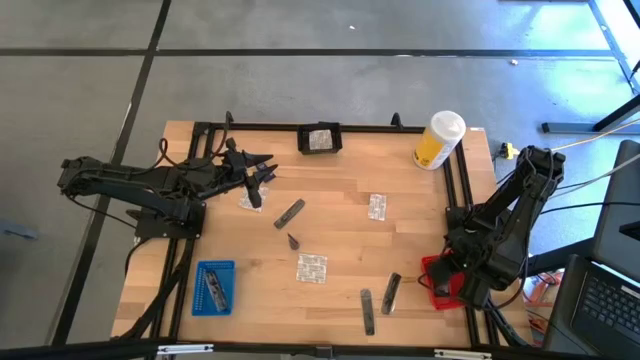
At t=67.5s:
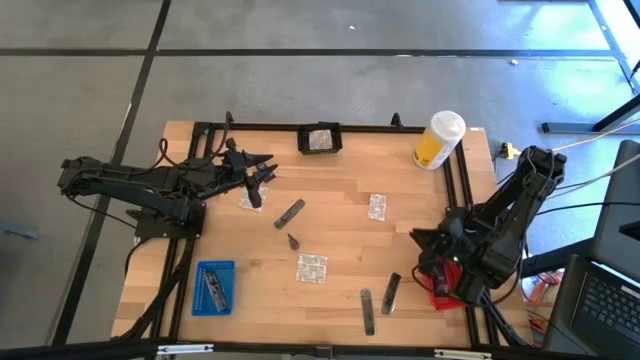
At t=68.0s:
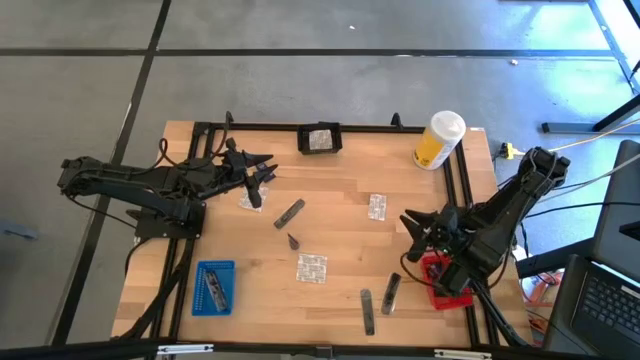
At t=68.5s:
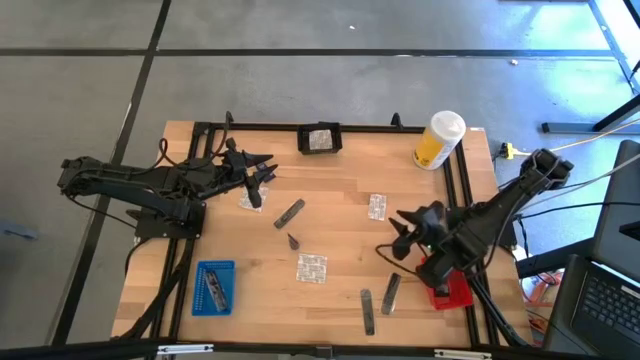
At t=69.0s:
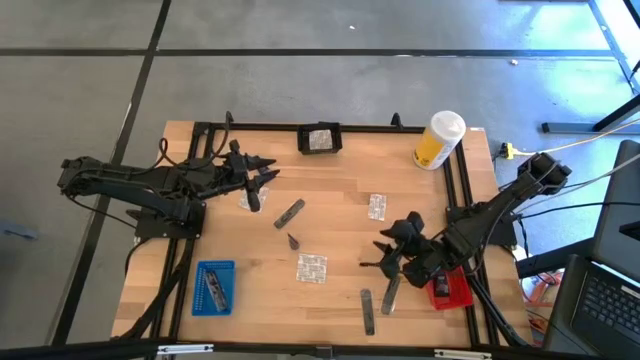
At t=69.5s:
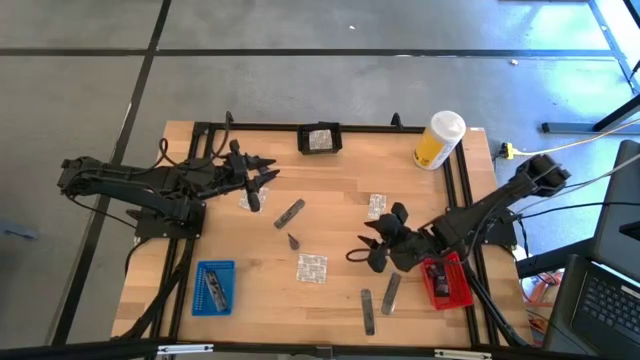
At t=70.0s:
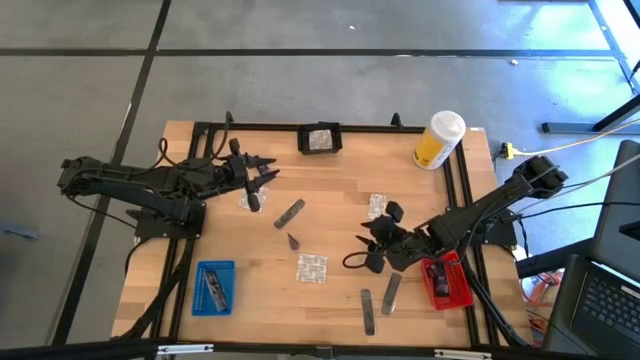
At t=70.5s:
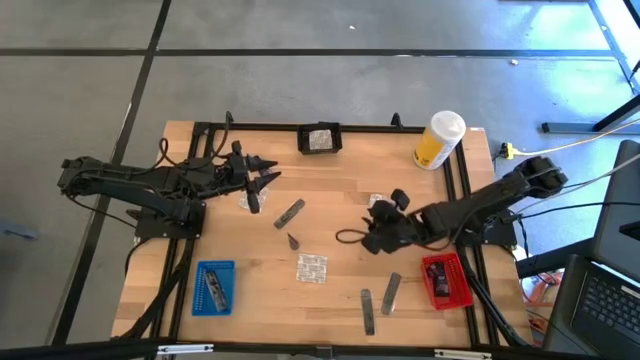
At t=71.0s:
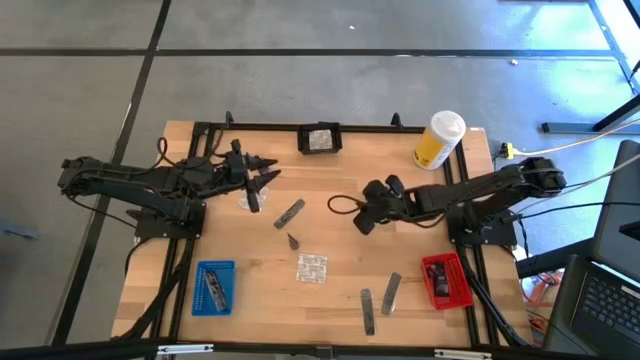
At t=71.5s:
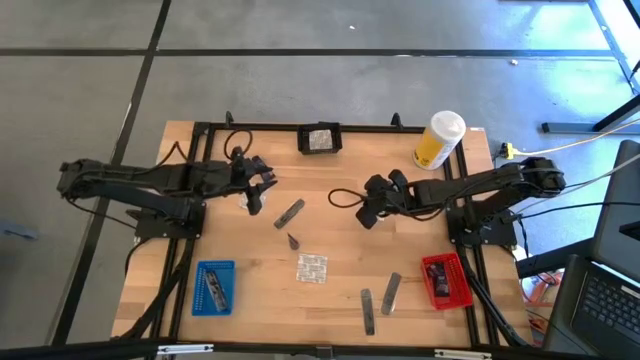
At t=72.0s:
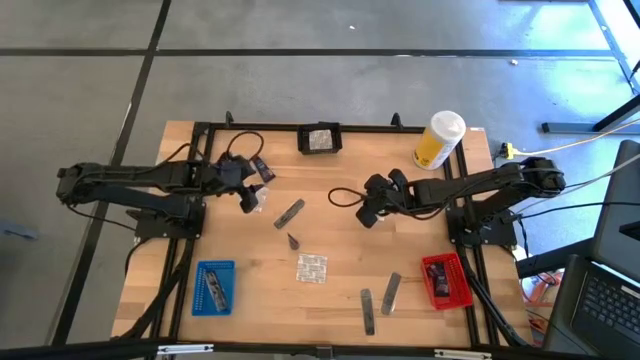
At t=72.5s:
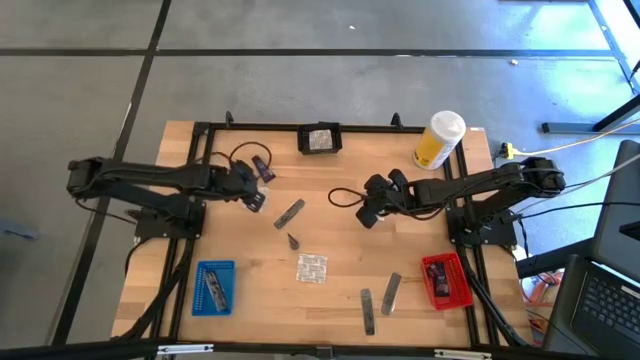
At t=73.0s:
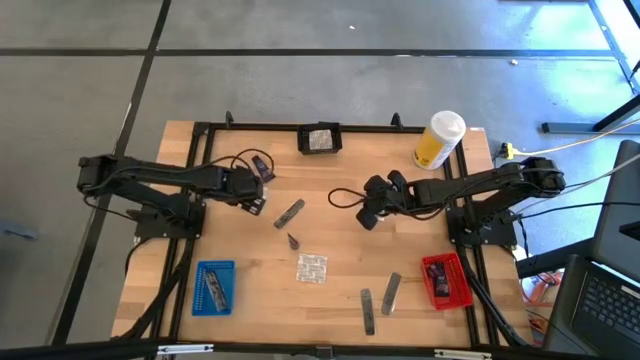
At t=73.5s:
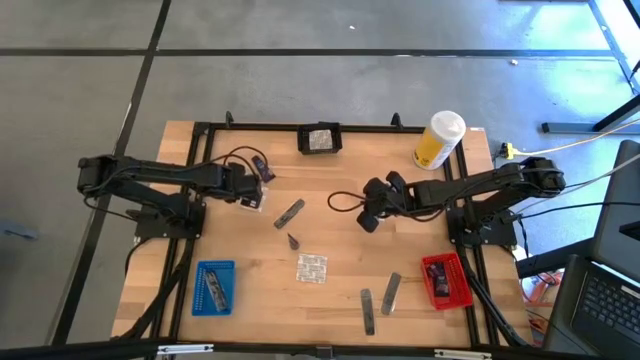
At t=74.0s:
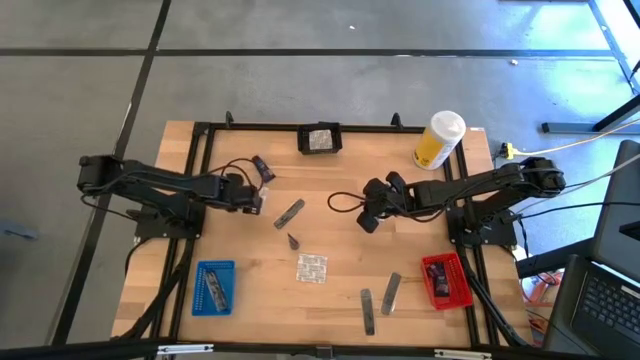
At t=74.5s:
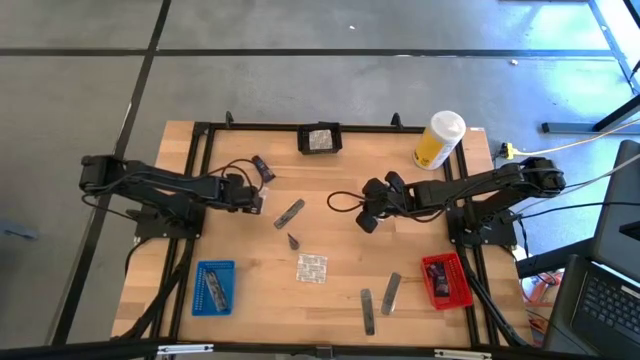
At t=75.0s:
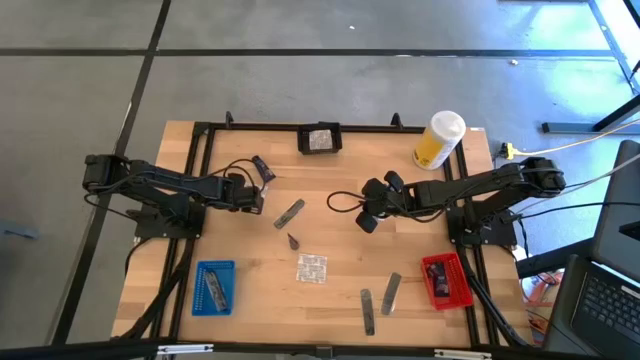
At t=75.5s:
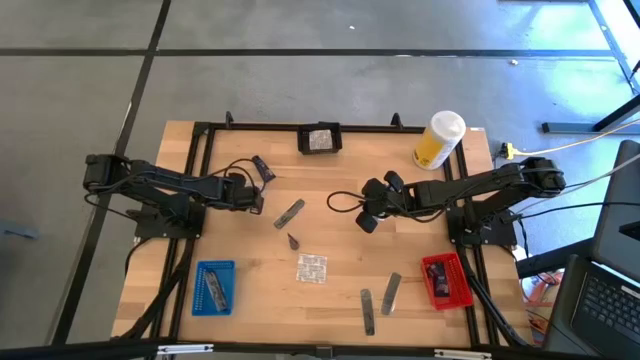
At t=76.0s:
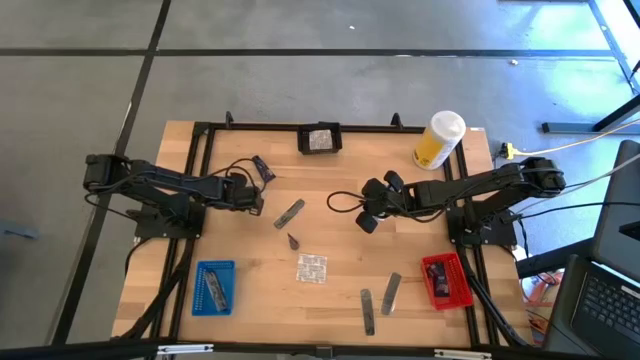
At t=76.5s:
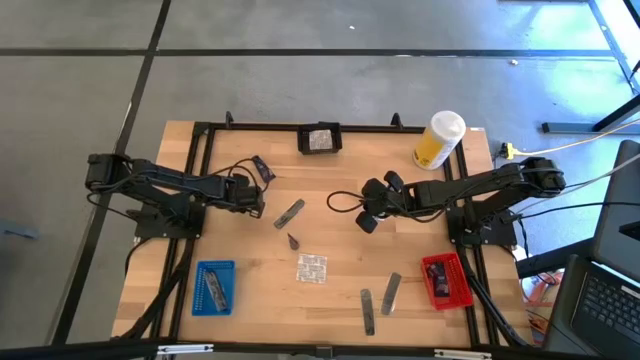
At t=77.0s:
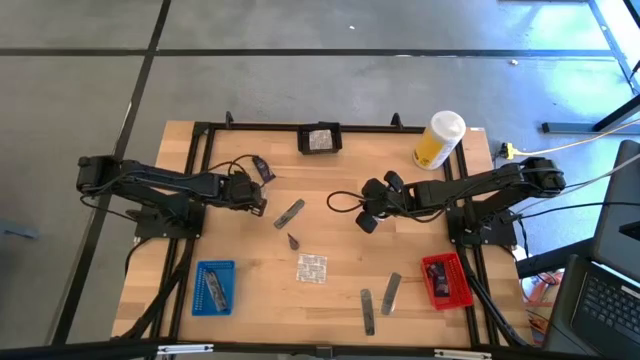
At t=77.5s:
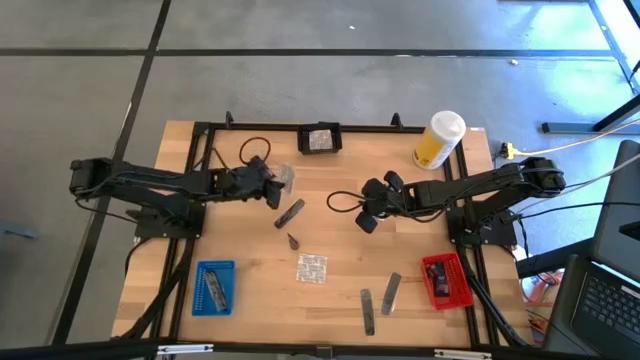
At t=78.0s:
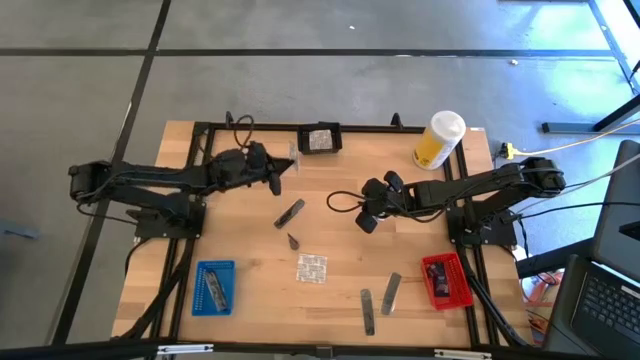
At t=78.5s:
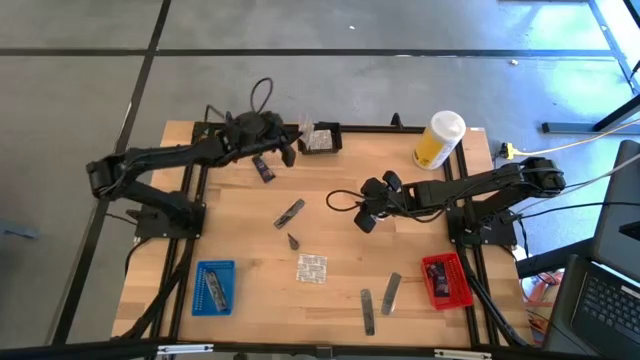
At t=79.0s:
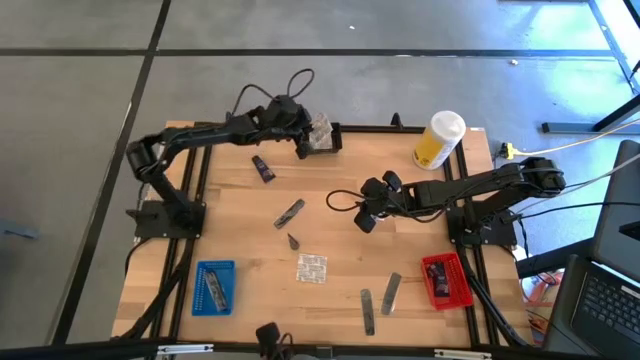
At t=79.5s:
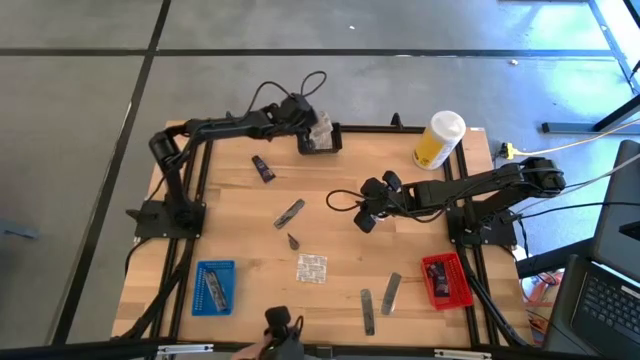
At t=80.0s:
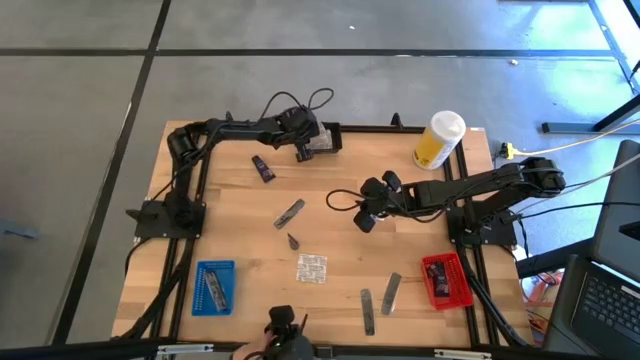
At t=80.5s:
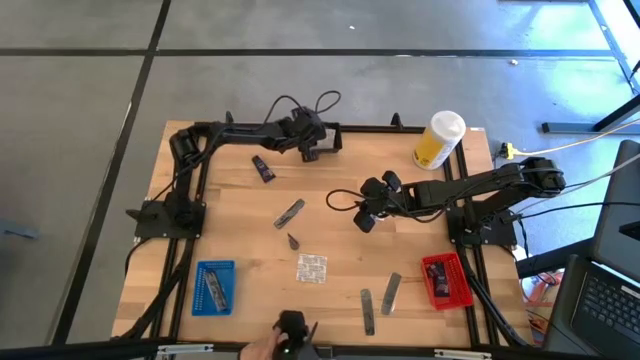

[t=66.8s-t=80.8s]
Task: Pick & Place Travel size toiletries
Put the white bandage into the black bin

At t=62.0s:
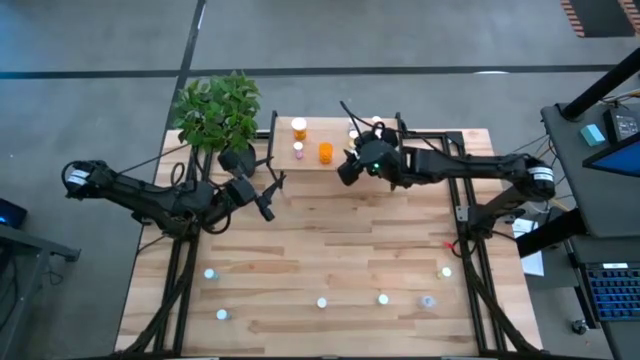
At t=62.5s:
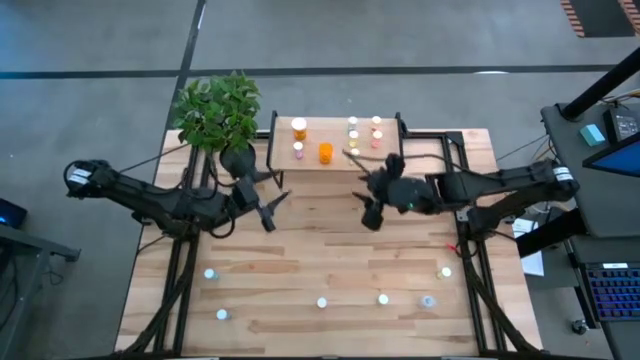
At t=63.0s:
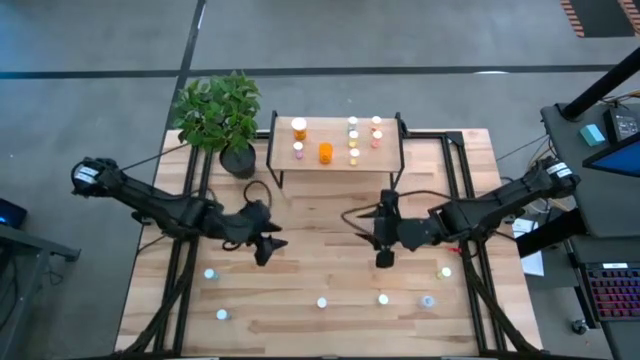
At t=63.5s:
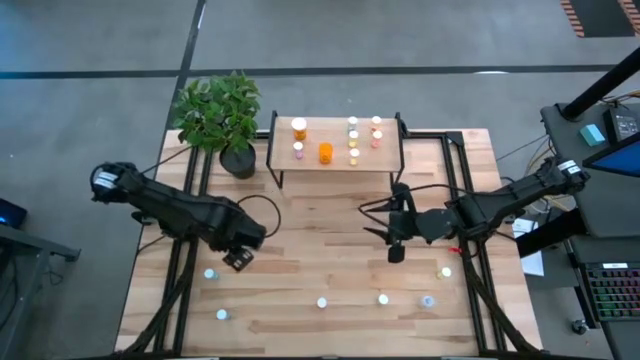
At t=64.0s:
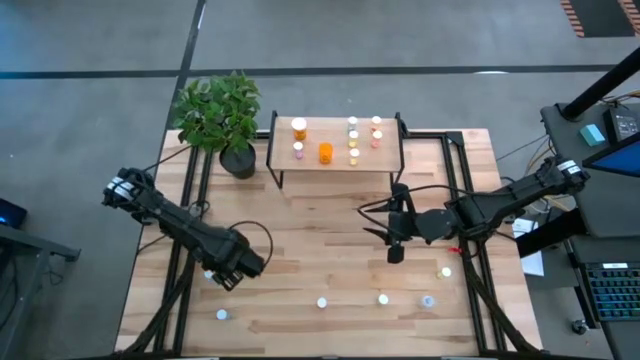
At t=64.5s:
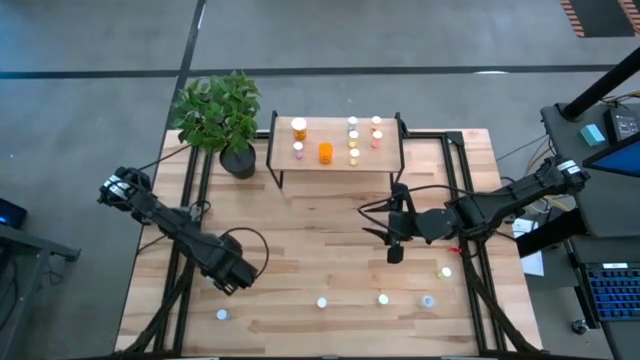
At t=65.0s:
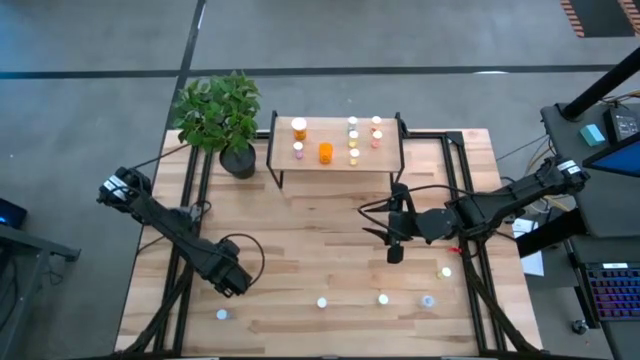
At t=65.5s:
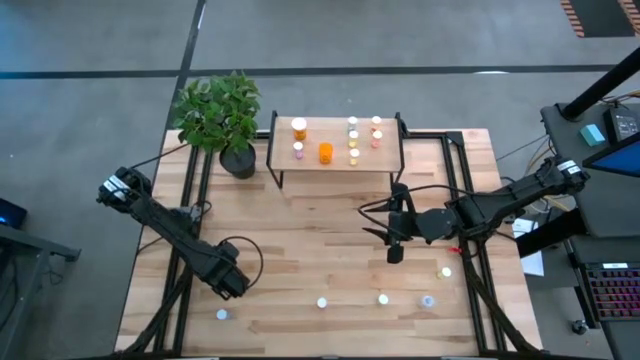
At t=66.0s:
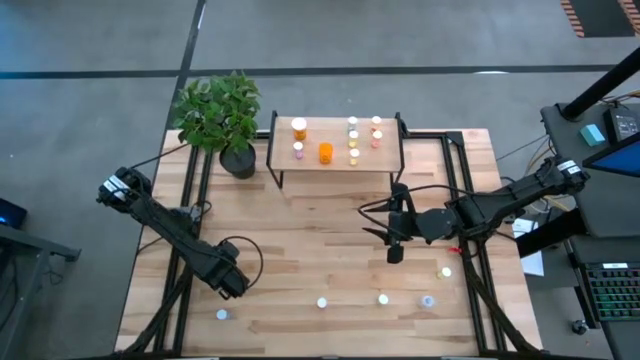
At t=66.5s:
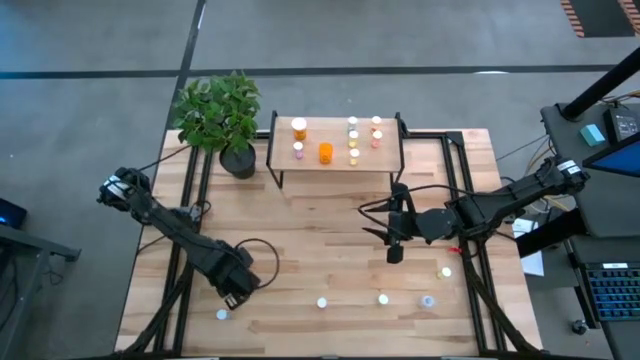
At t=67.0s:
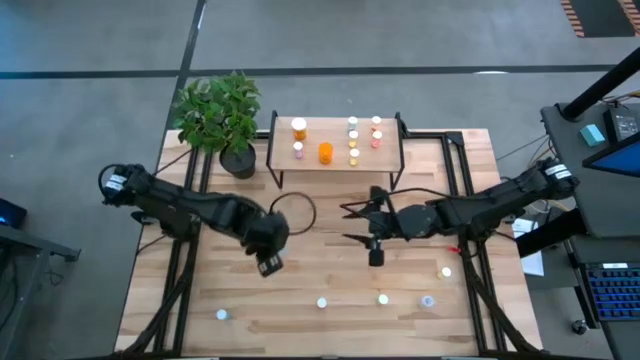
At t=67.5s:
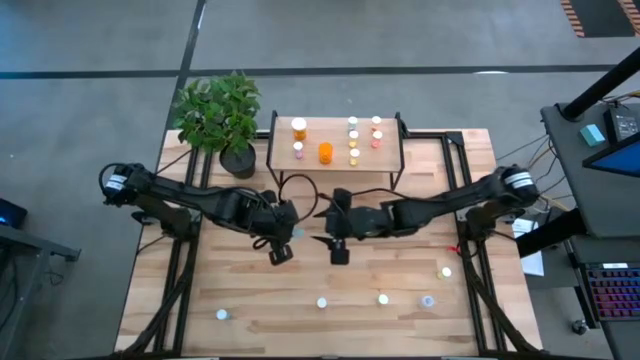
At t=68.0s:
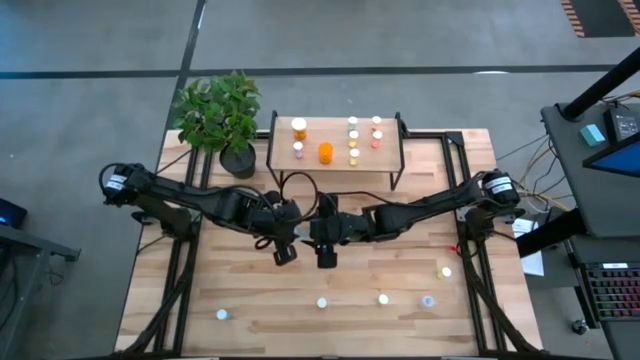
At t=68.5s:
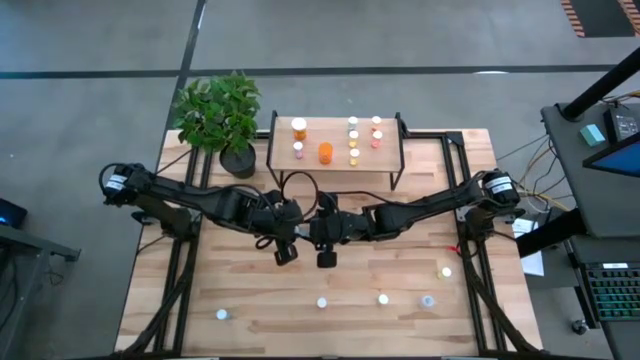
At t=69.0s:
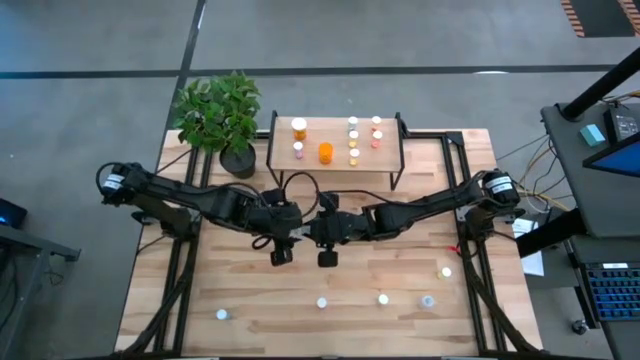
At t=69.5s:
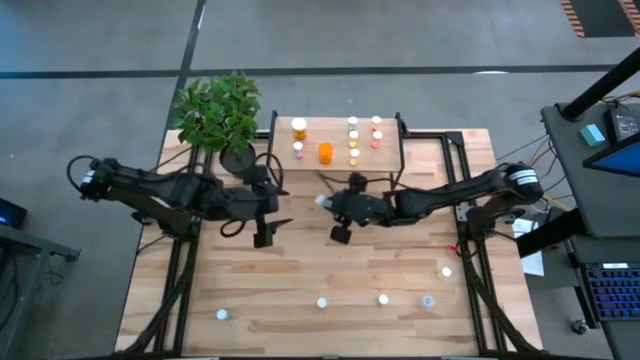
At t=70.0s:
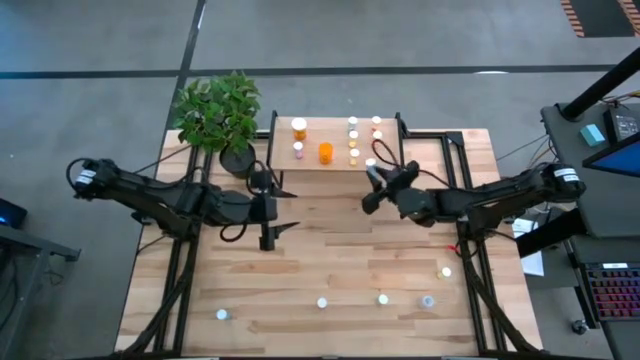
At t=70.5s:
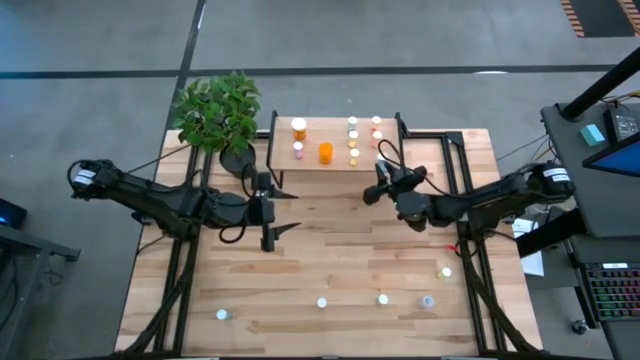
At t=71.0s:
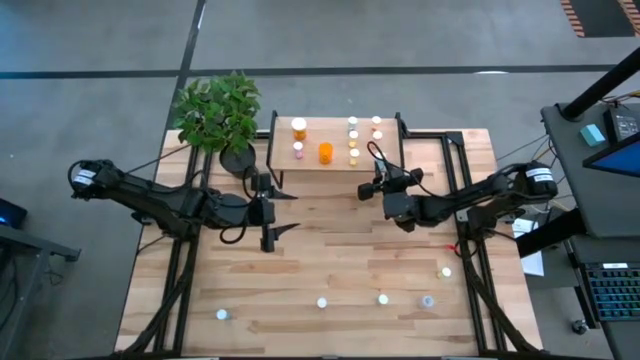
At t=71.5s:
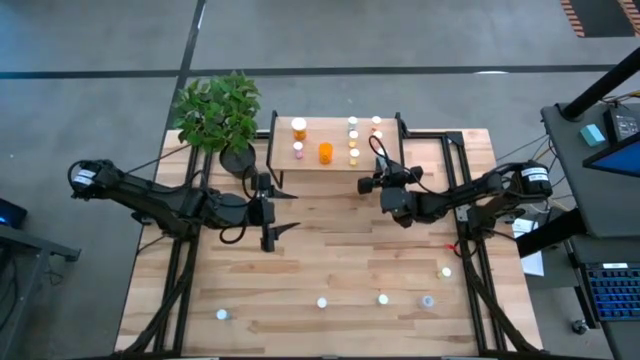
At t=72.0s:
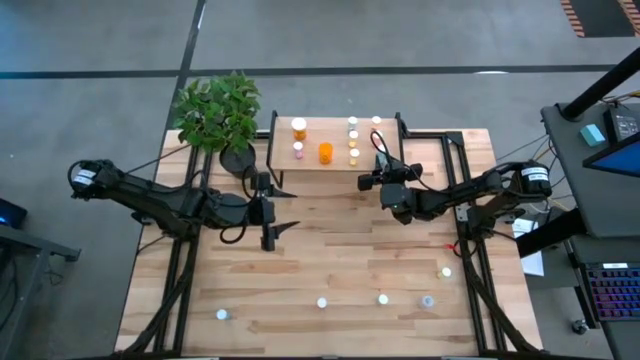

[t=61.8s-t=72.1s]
Task: Pick and place medicine bottles onto shelf by color
Put the blue pill bottle on the shelf
